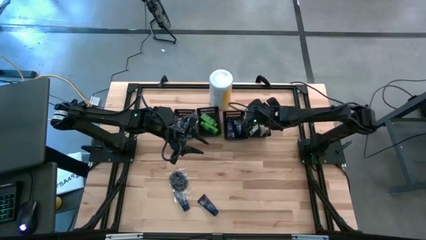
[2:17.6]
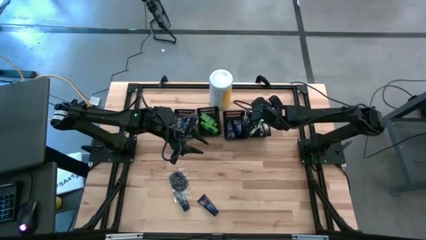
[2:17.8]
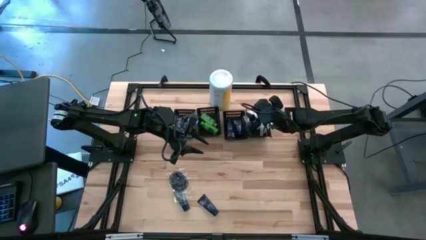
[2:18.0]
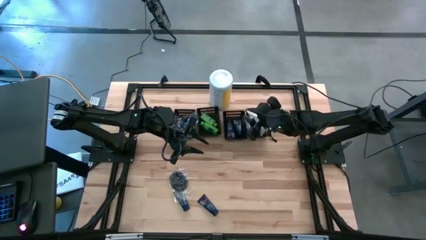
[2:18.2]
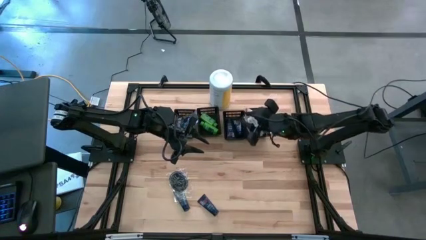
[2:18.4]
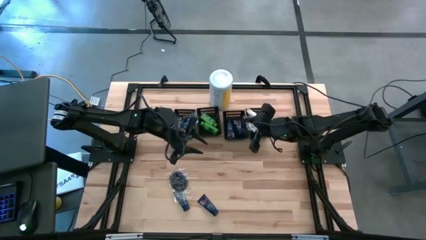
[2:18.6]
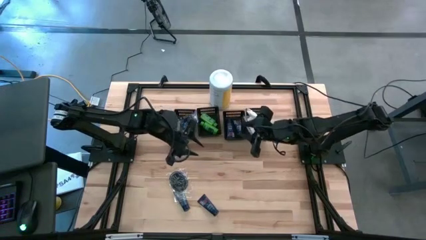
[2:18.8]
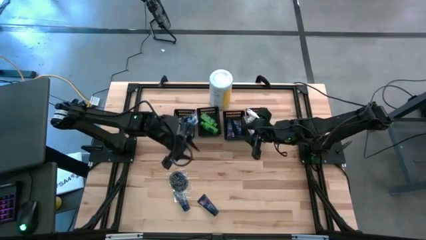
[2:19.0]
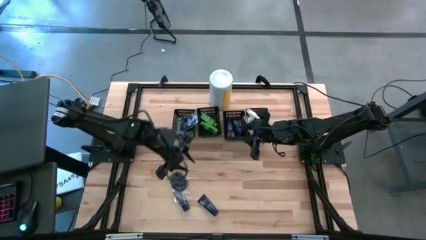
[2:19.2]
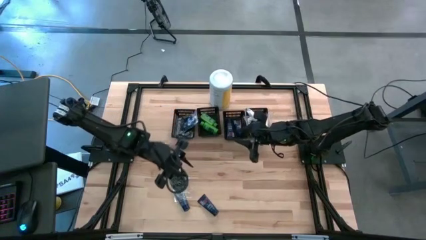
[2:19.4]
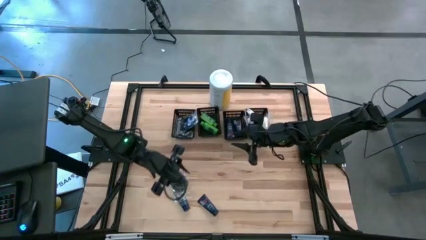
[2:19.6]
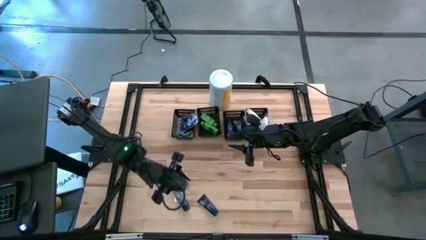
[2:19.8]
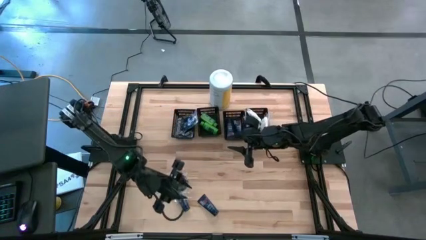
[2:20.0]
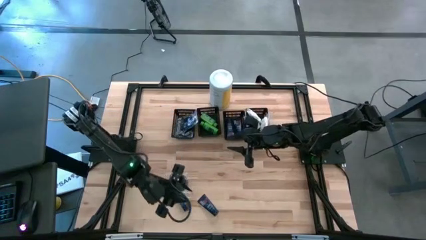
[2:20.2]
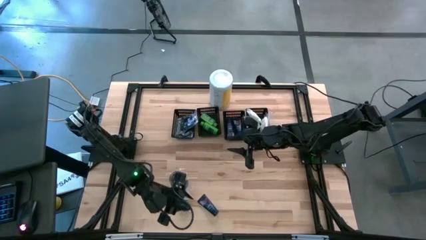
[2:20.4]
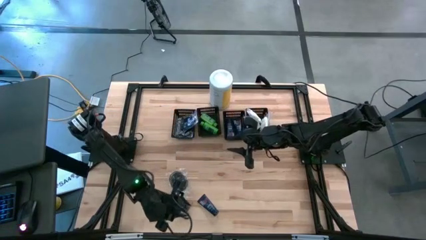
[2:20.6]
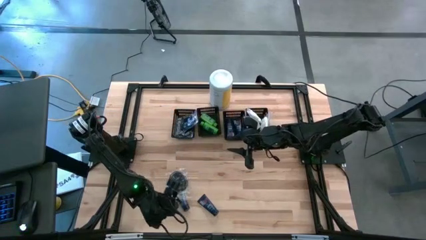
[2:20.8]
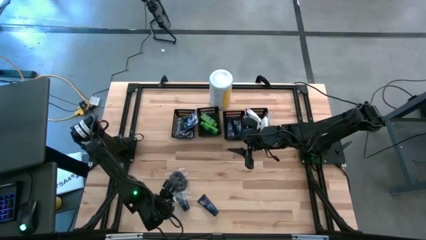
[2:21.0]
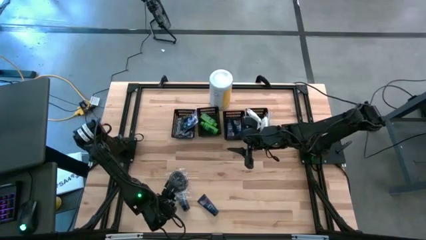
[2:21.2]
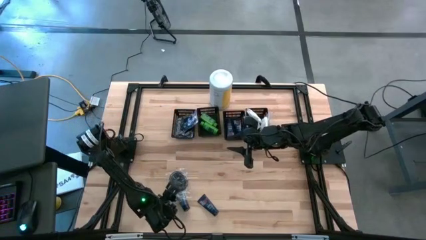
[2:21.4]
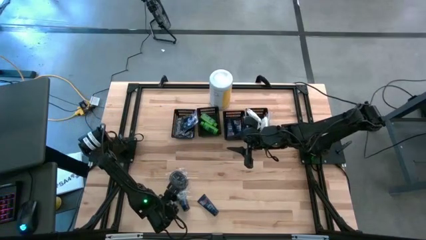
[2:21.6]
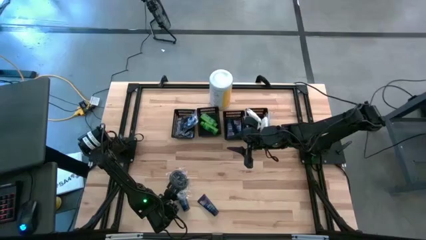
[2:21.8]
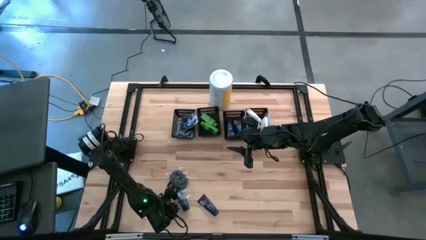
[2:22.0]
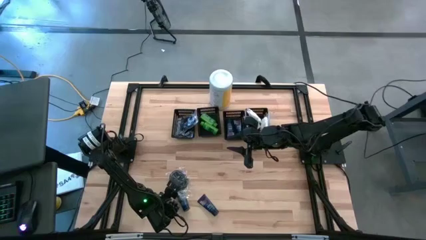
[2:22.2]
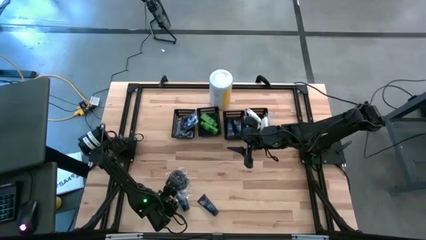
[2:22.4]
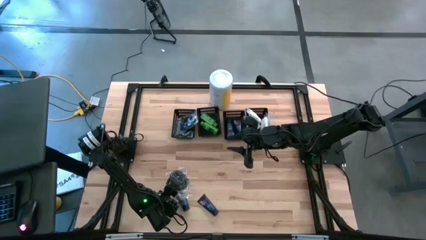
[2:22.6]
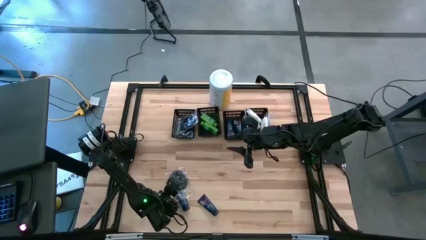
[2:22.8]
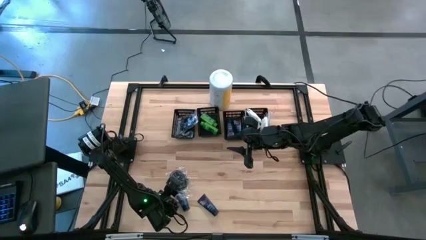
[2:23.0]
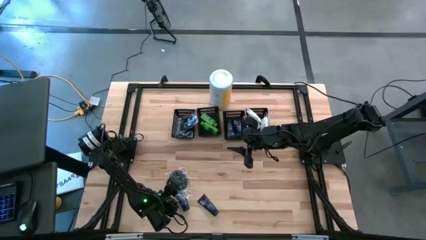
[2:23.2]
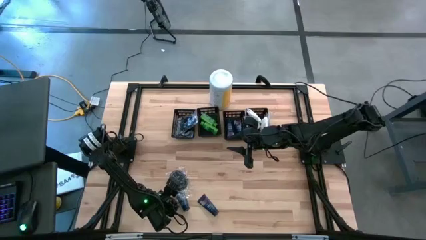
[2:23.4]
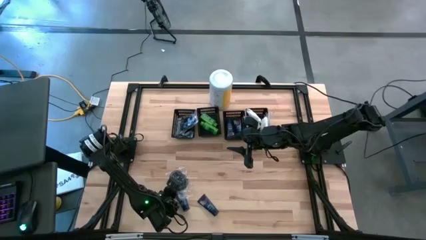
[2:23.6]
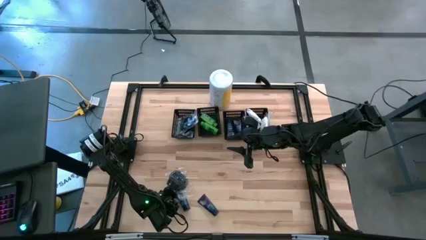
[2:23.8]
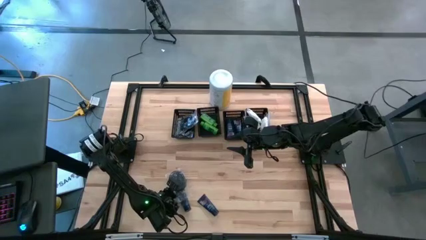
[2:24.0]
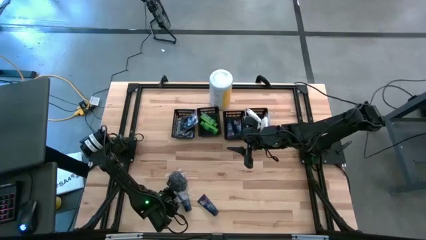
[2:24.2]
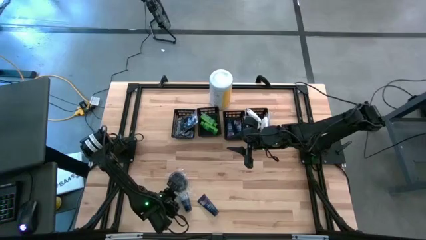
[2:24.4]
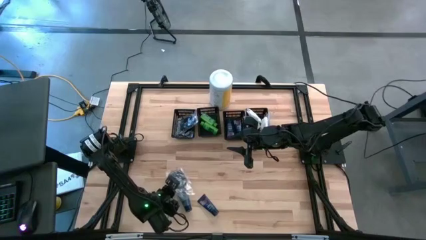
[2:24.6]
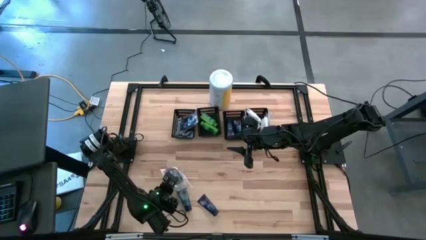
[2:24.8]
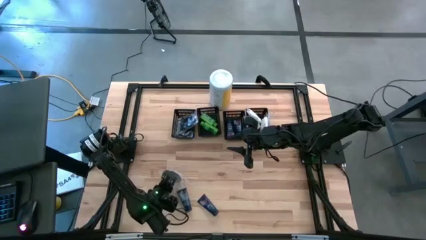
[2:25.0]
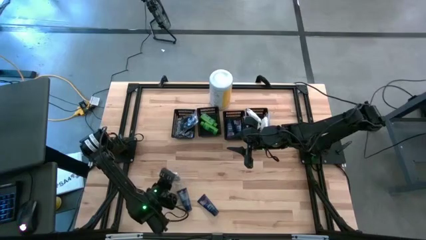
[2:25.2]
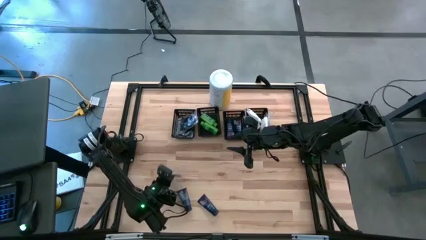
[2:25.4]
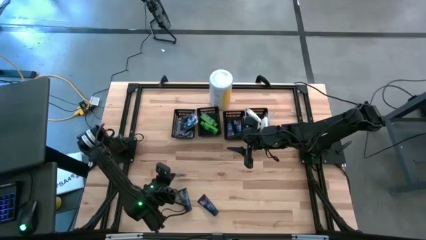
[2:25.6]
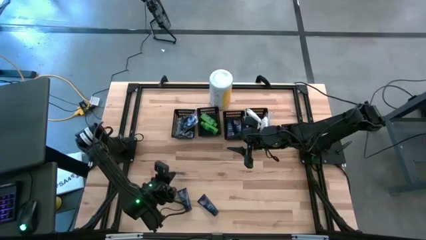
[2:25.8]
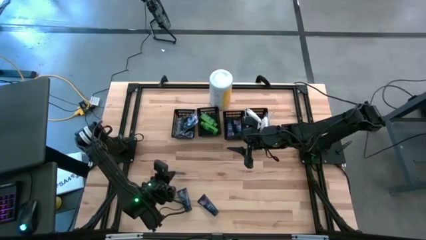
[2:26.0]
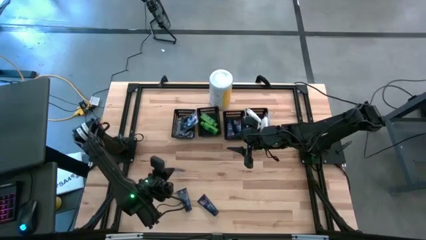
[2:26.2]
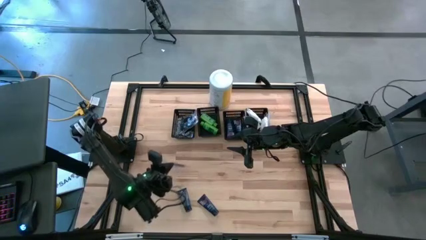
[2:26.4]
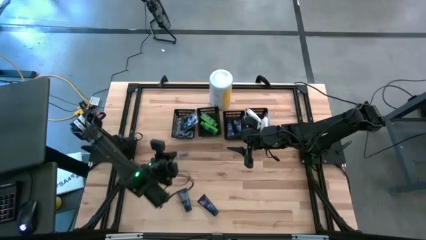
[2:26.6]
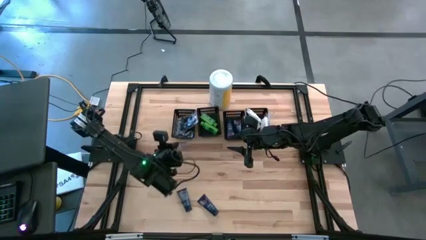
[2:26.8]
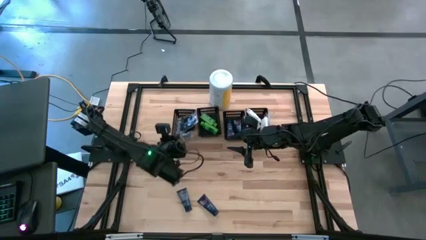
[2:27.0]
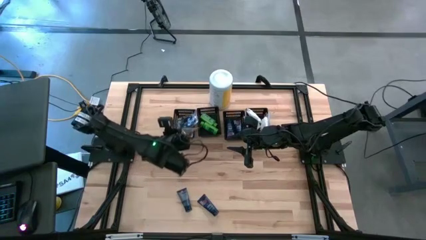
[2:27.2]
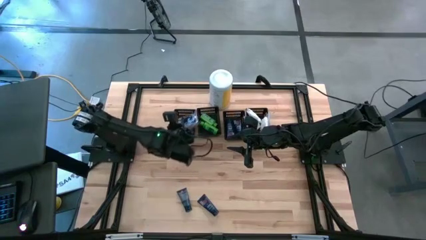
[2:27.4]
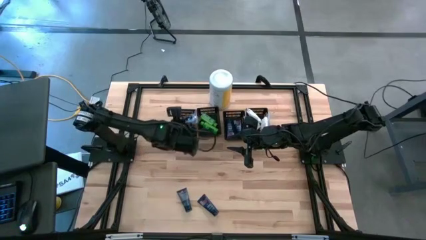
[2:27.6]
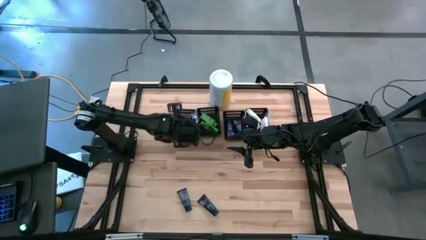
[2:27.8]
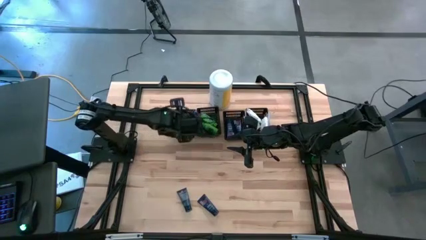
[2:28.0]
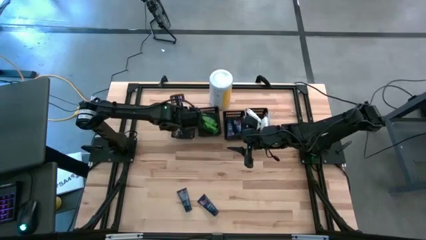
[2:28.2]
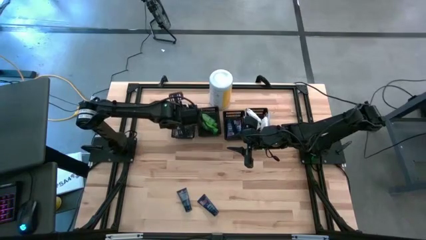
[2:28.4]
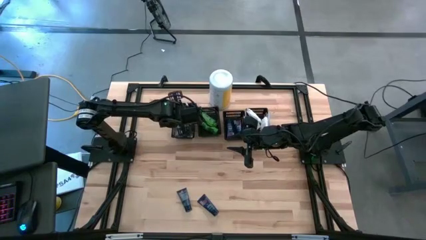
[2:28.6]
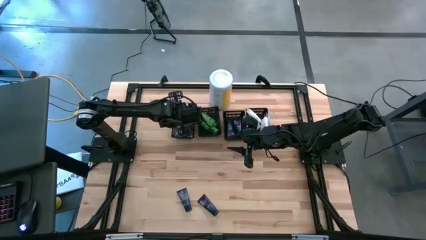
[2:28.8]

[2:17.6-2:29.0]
Task: Pick & Place Travel size toiletries
Put the black hairbrush into the left black bin

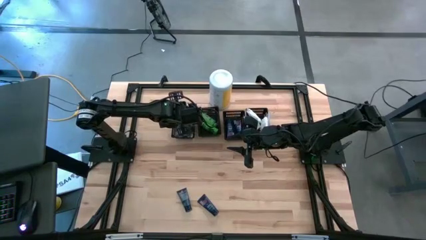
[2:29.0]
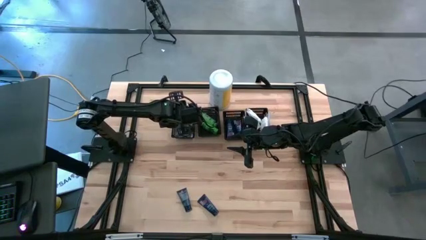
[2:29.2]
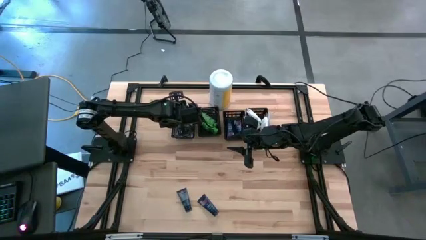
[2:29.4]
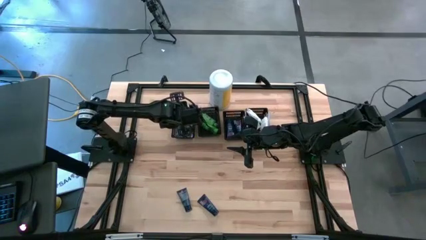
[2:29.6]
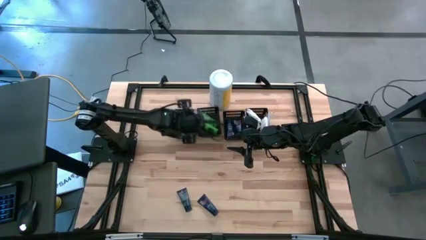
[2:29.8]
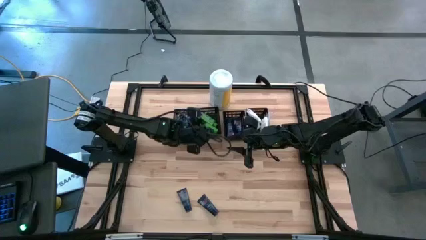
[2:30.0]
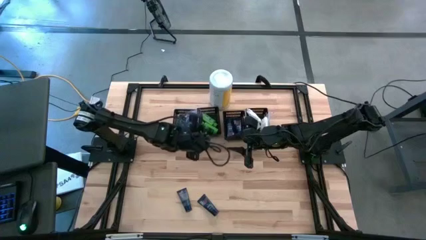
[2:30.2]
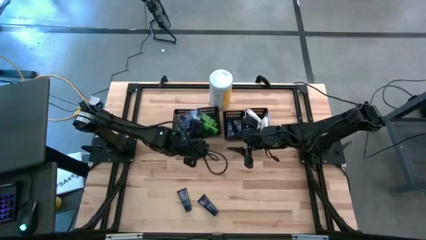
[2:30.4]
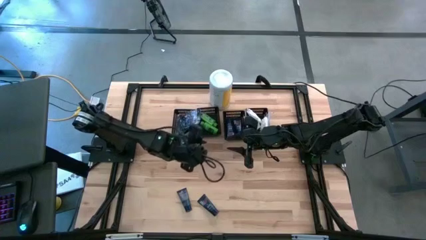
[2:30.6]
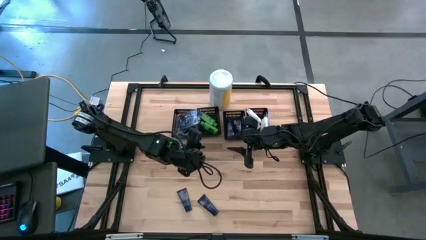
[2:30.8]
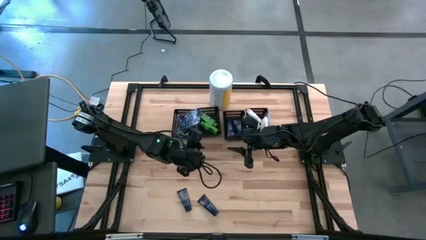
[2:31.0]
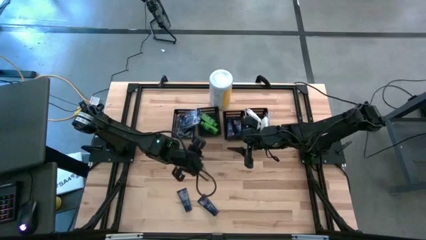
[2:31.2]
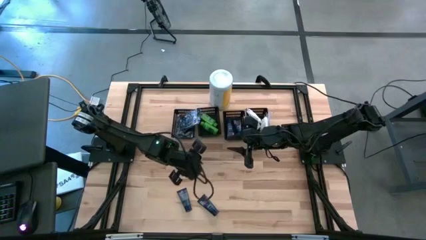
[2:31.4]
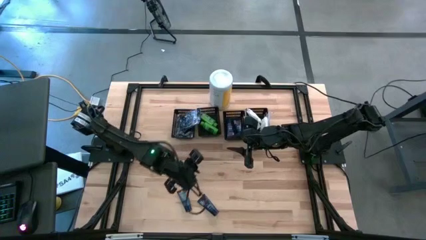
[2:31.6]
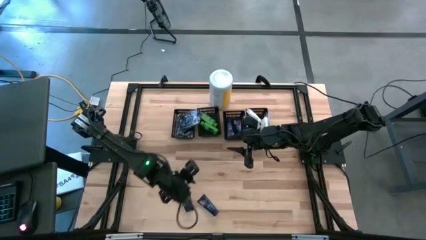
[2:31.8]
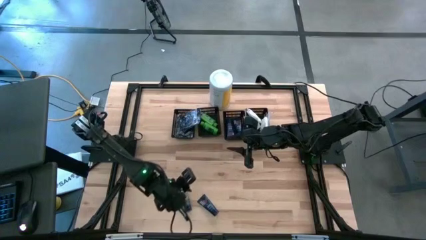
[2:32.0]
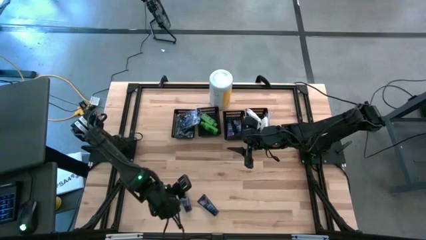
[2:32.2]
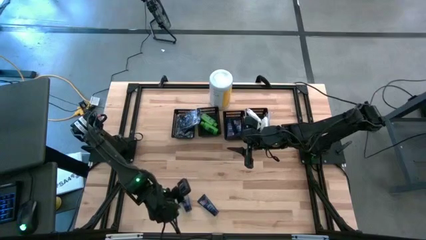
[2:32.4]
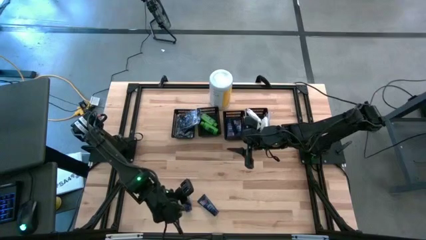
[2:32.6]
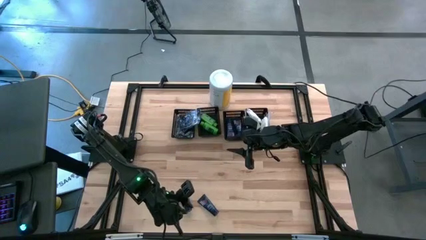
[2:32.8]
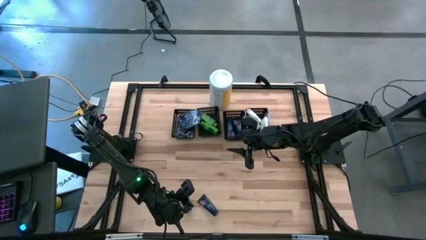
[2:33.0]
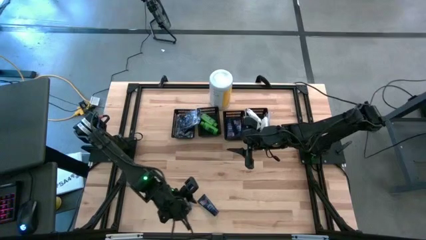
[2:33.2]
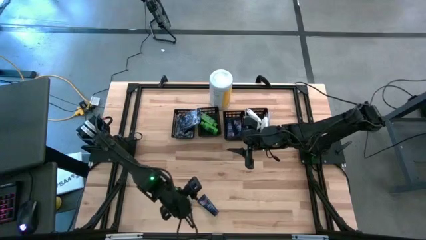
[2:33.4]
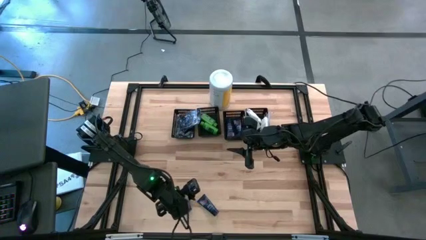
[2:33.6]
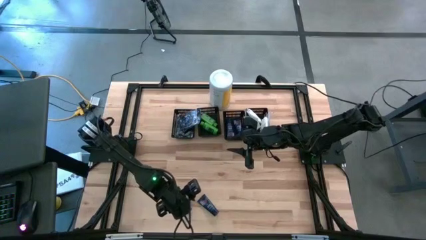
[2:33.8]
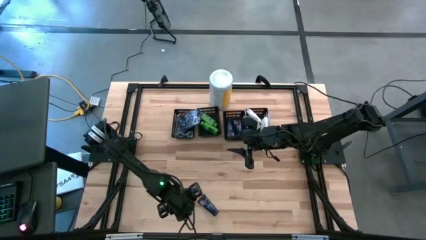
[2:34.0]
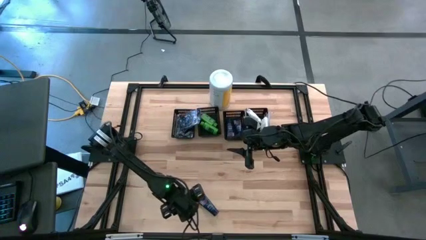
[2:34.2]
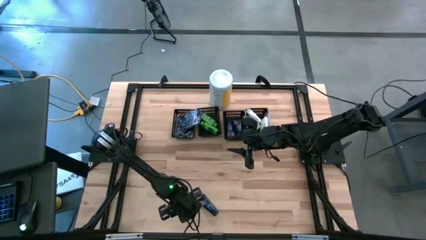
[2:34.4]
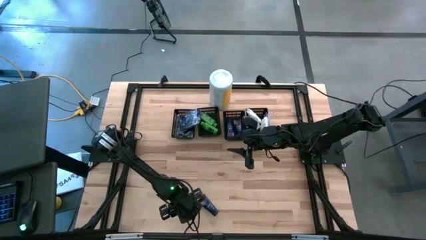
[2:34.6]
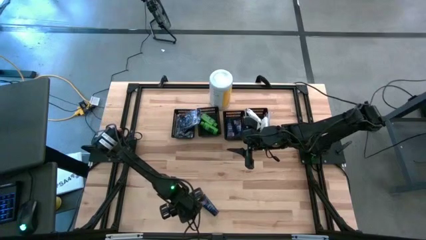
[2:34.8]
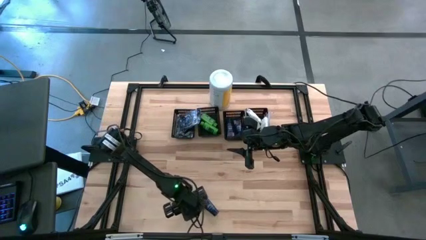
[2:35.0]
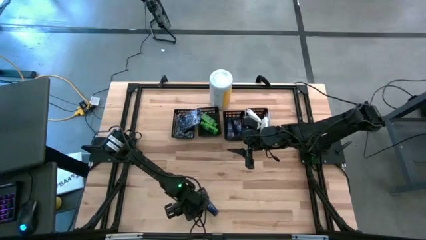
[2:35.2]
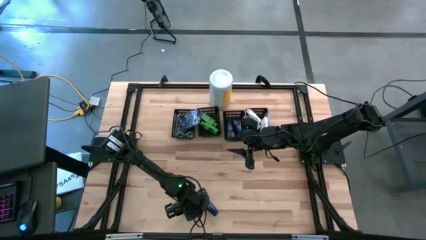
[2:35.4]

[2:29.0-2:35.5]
Put the left blue bottle in the middle right bin
